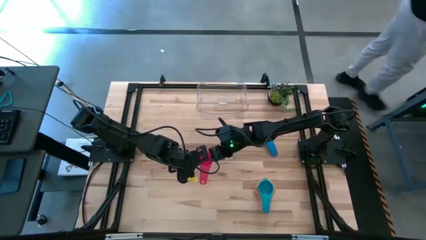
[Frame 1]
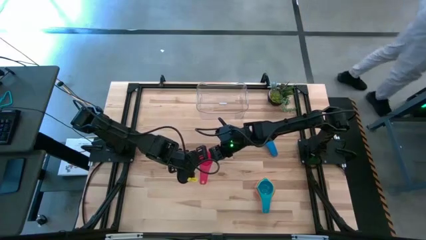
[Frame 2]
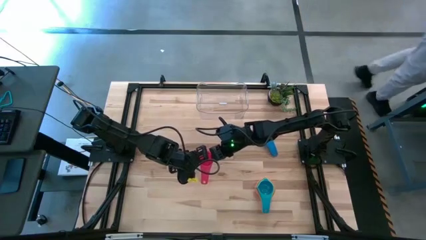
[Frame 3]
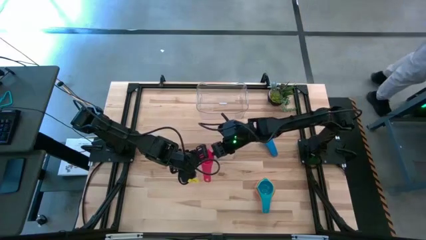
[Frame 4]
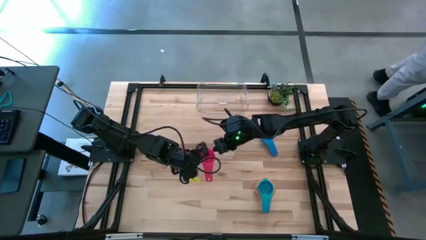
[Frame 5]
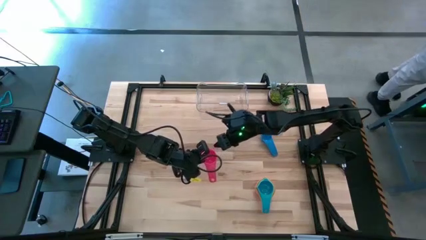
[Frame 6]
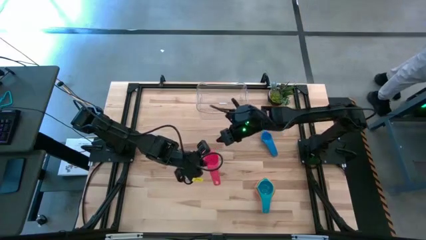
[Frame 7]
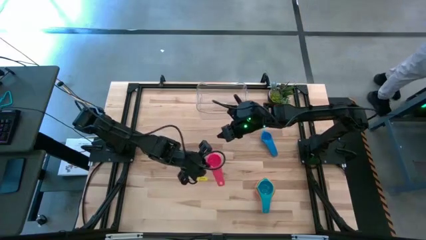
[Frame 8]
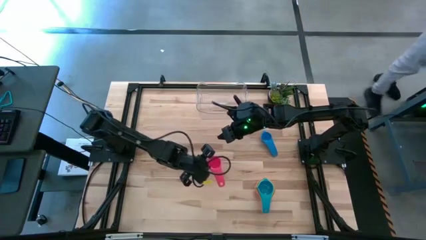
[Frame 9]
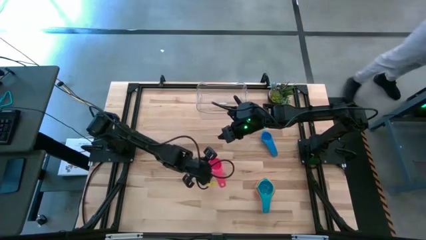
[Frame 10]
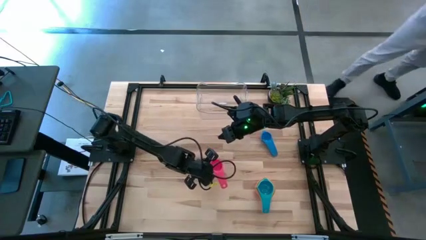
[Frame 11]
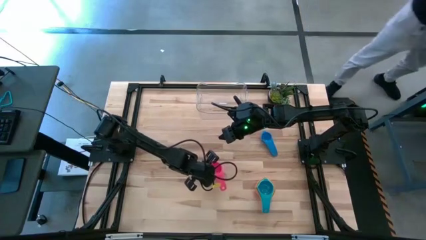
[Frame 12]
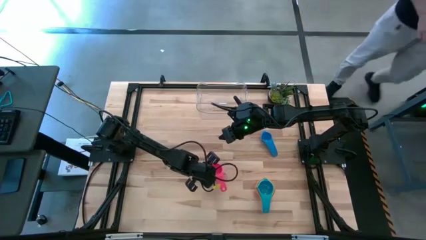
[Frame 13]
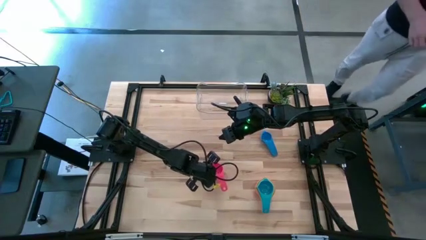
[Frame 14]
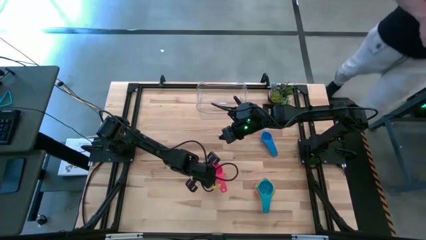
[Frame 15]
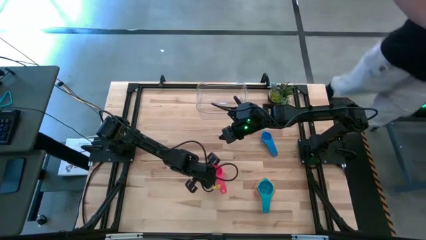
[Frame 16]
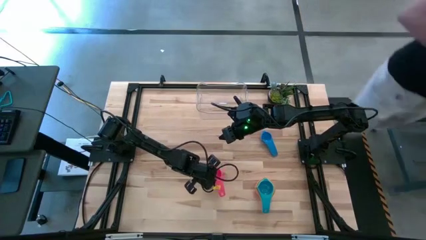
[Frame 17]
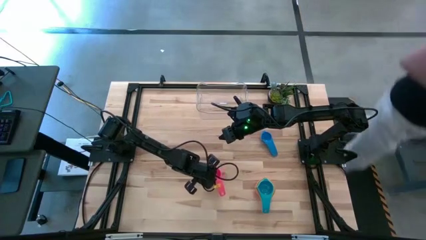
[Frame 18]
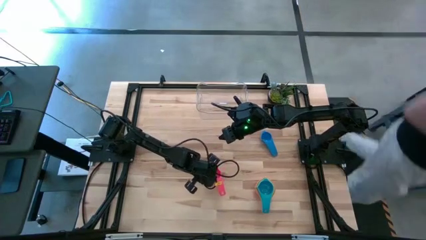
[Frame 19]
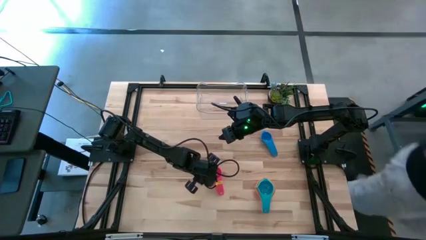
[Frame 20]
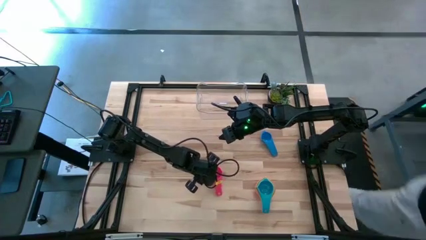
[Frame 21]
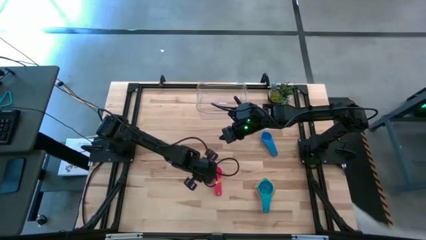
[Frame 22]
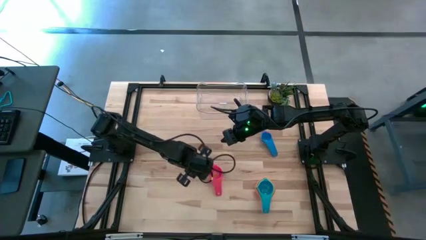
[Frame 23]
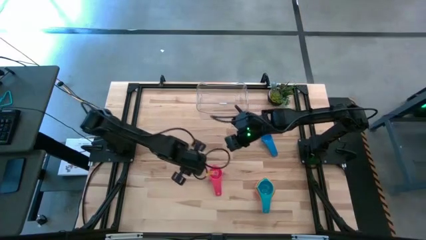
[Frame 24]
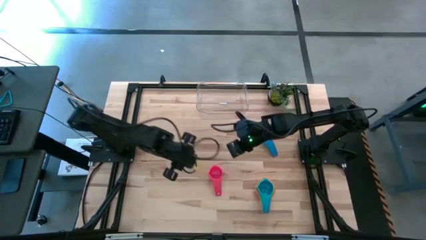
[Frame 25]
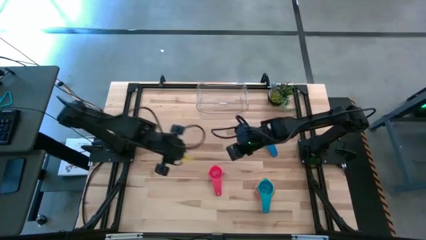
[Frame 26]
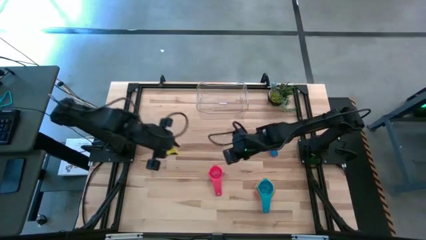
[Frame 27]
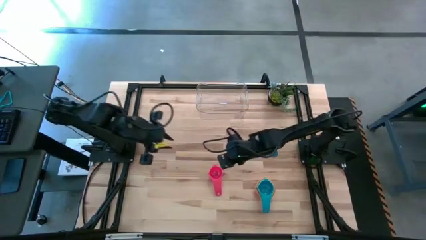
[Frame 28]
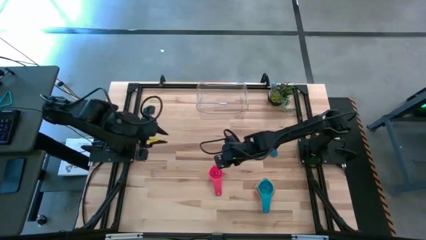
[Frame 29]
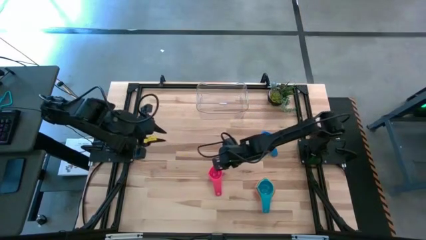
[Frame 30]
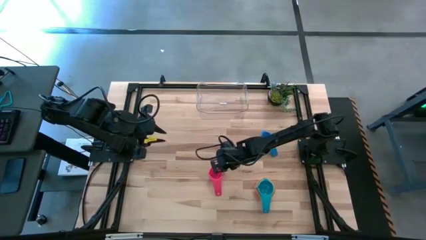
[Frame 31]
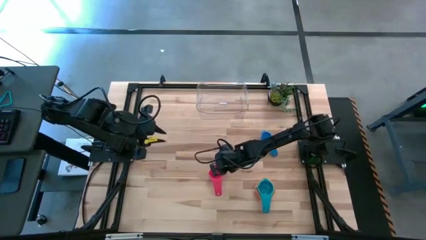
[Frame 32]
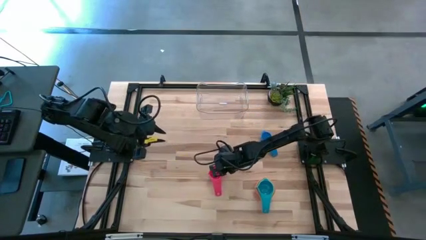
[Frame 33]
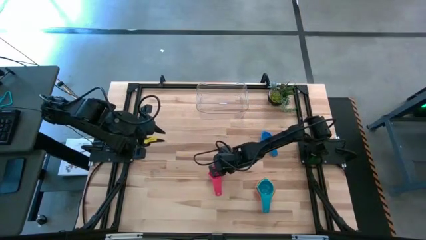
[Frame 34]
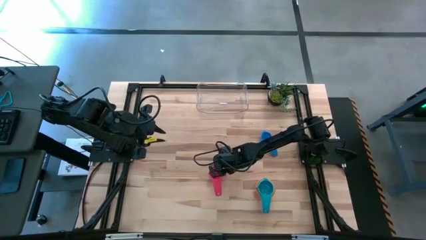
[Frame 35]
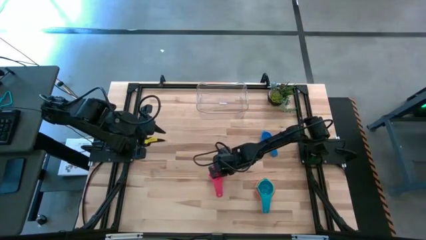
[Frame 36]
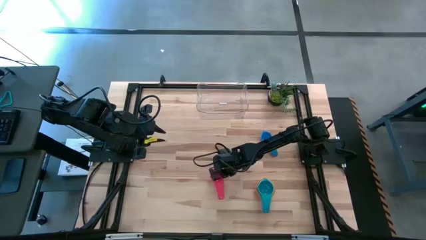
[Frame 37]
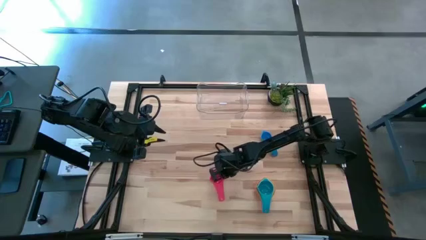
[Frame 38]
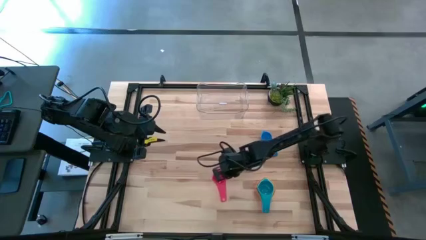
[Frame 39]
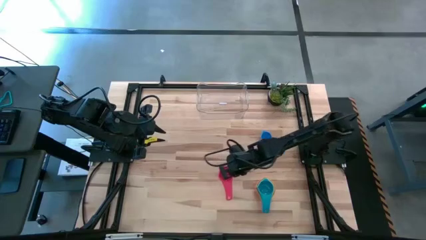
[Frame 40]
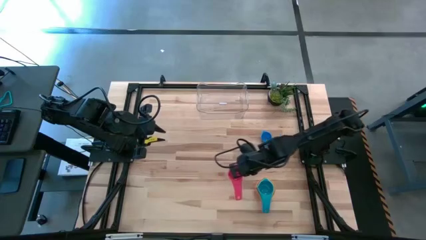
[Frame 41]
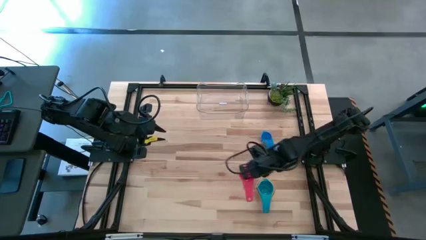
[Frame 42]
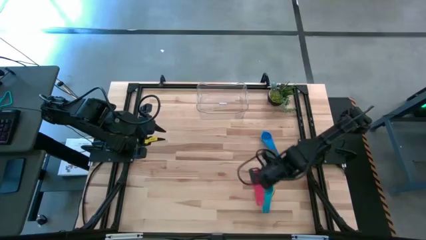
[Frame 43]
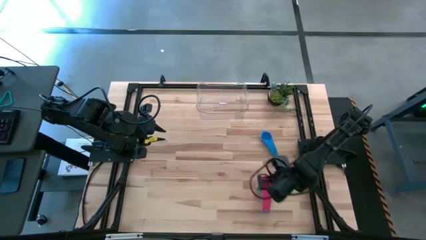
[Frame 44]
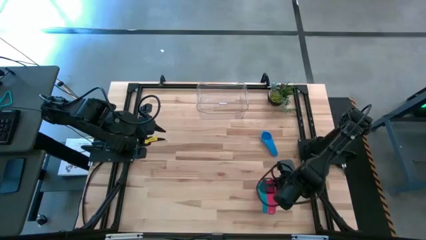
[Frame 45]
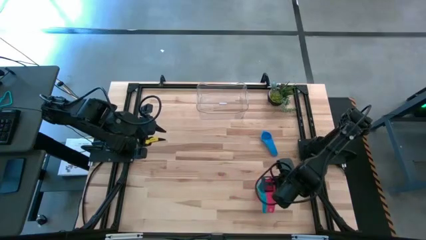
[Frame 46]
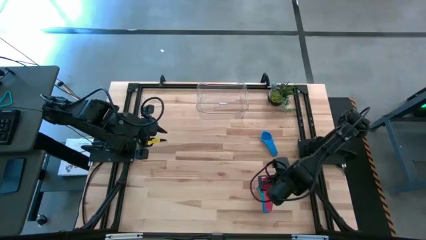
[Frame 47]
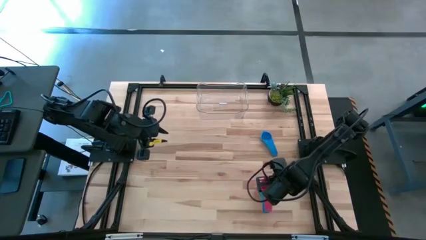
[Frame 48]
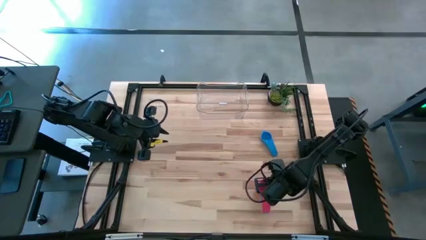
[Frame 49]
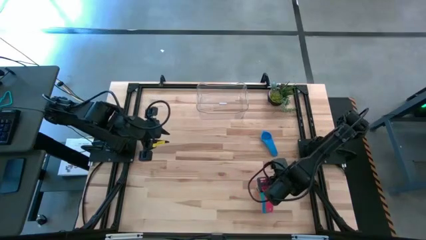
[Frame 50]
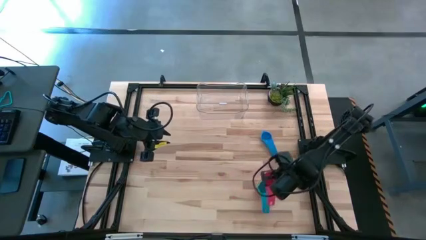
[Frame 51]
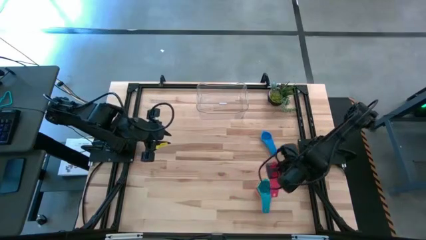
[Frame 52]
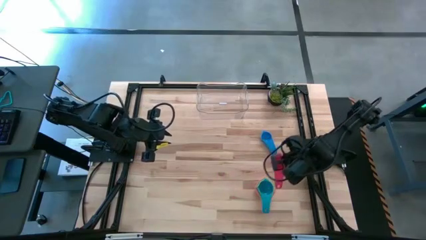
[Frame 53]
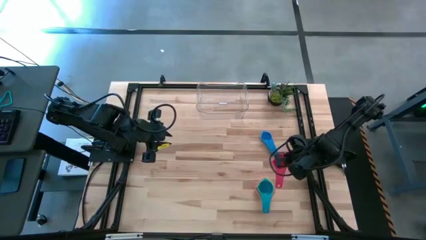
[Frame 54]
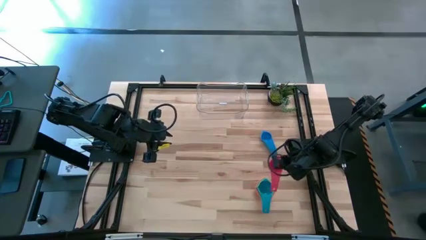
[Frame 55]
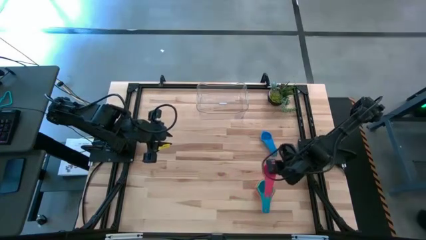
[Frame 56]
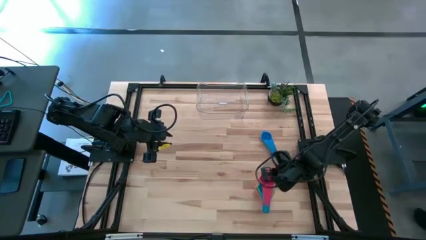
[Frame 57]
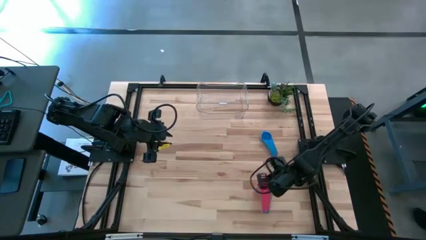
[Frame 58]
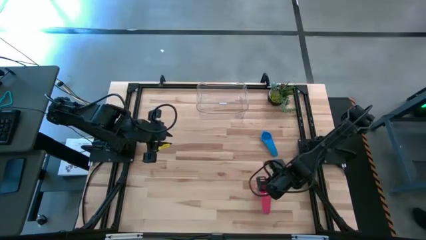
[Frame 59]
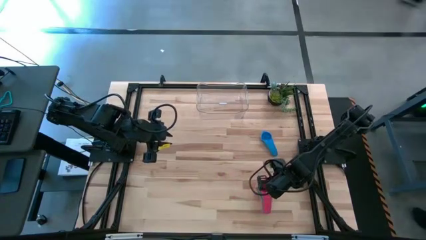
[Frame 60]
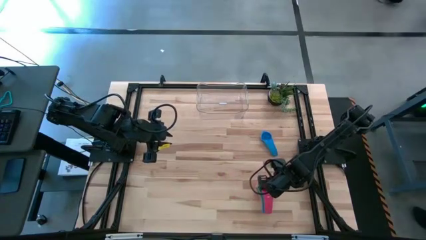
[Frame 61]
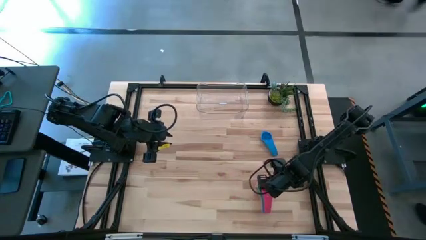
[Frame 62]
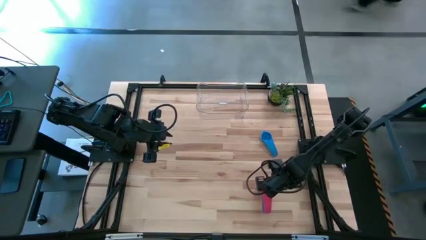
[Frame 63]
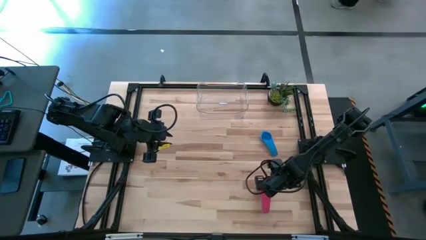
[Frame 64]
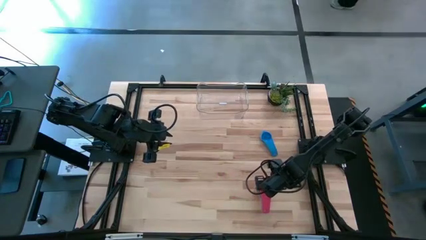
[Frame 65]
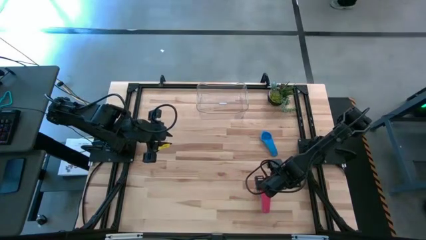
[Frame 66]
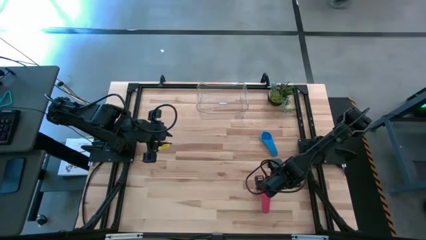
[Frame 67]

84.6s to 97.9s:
Task: Nest measuring cups in basket
Stack the red measuring cup on top of the other sky blue measuring cup

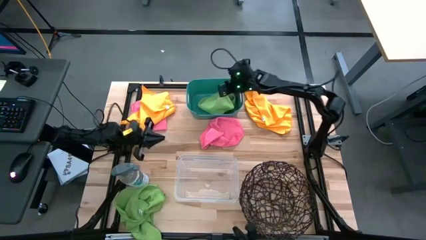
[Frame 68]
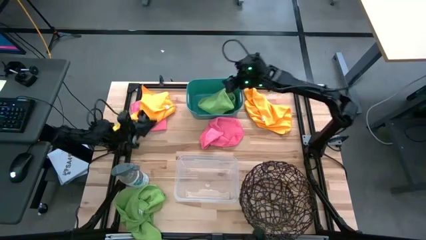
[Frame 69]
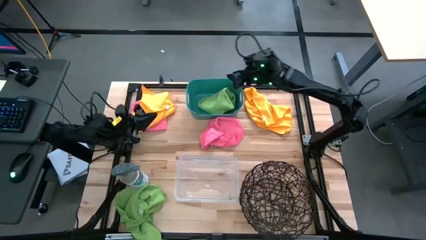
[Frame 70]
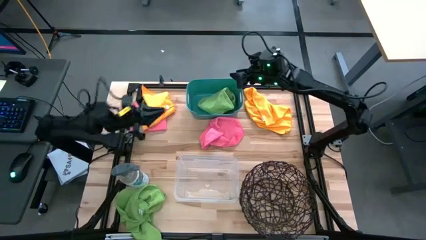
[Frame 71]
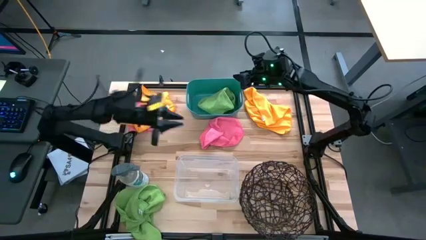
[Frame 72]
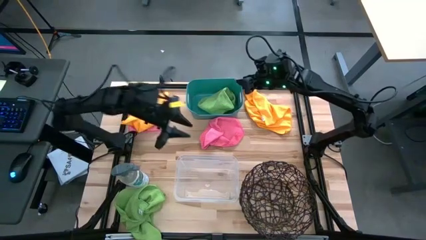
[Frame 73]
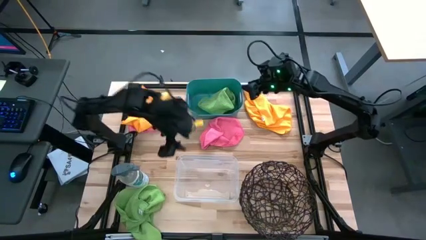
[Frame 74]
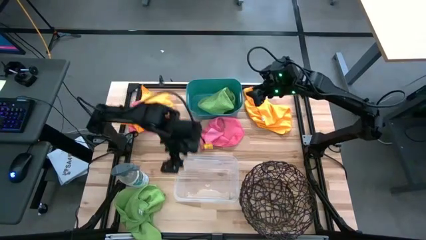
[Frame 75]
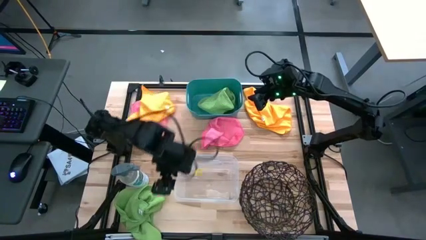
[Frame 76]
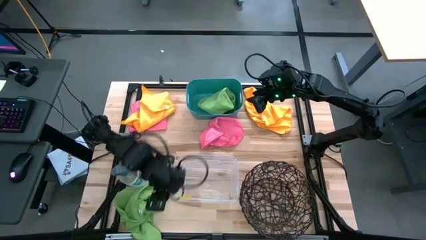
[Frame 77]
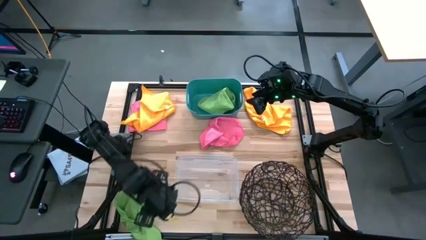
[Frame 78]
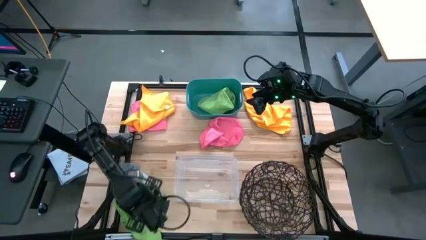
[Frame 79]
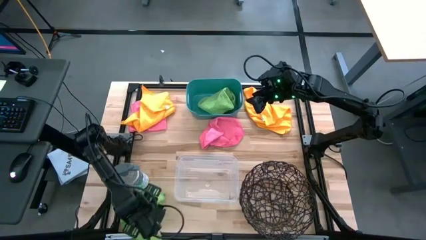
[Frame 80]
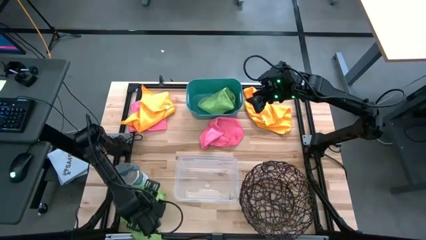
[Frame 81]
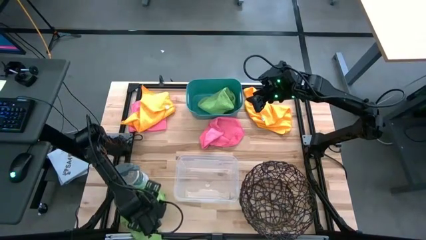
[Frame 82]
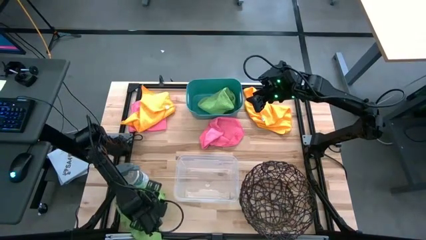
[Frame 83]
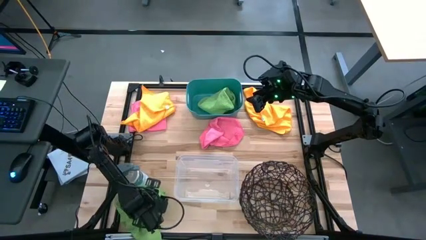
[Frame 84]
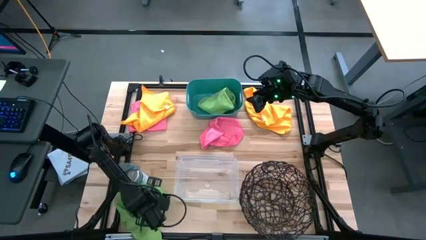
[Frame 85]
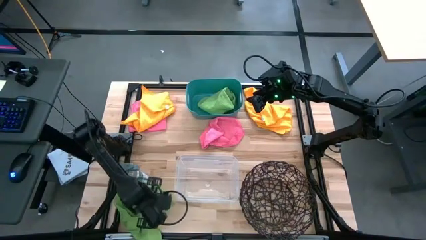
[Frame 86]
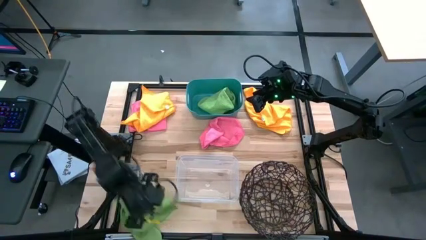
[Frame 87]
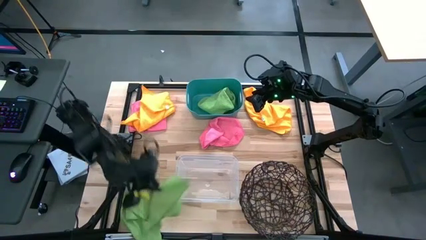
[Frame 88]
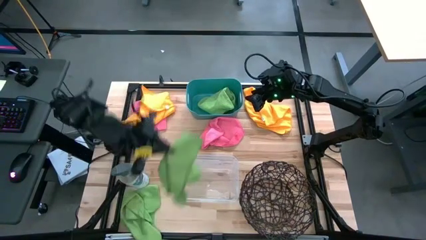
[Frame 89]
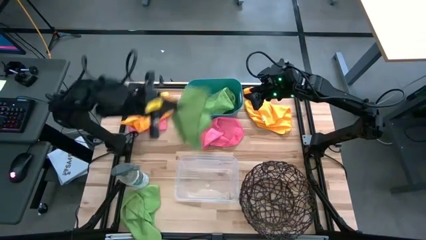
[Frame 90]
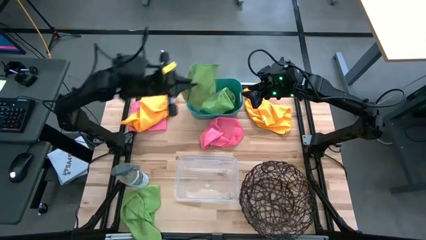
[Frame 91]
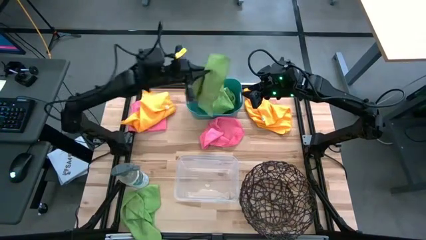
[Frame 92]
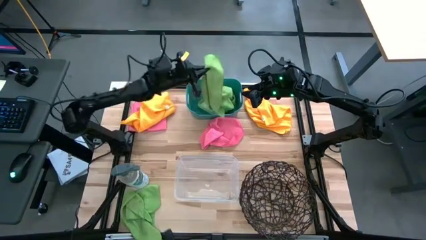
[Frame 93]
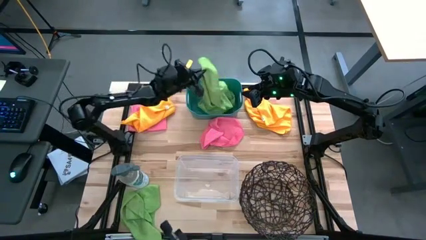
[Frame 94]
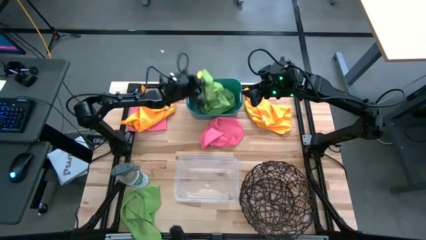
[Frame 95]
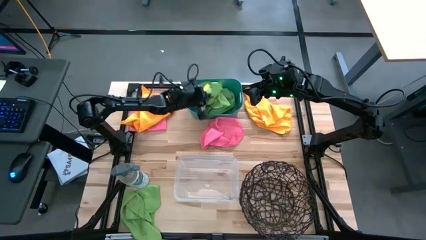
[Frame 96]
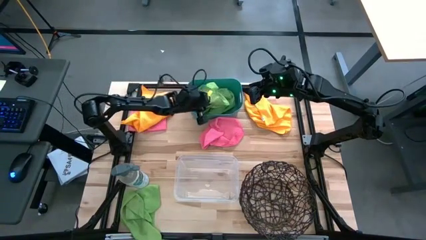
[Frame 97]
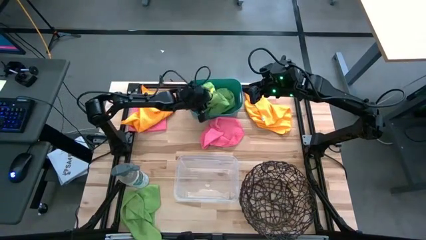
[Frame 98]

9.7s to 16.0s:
Task: Sort microfiber towel by color & place in baskets
Put the green microfiber cloth into the green bin
